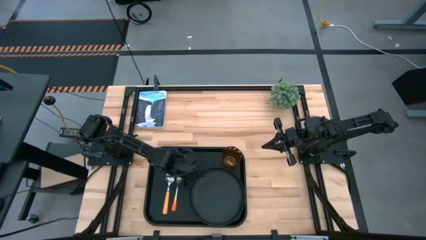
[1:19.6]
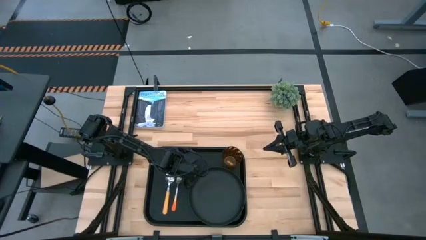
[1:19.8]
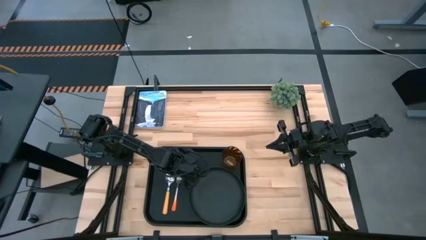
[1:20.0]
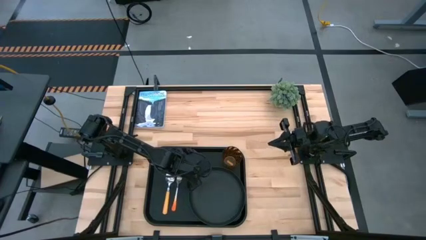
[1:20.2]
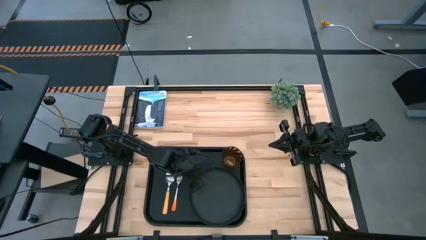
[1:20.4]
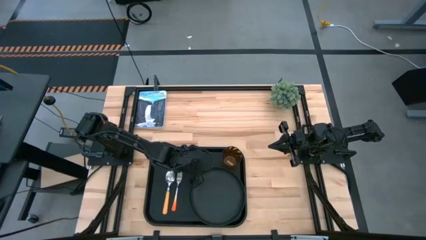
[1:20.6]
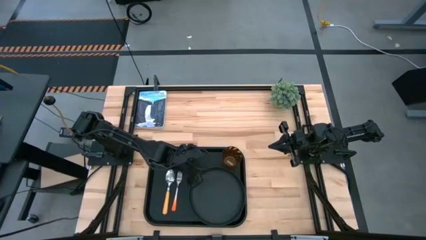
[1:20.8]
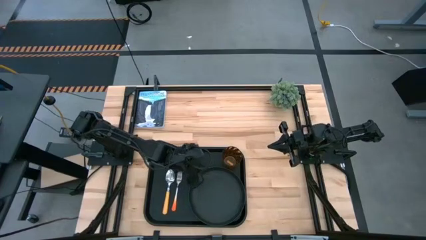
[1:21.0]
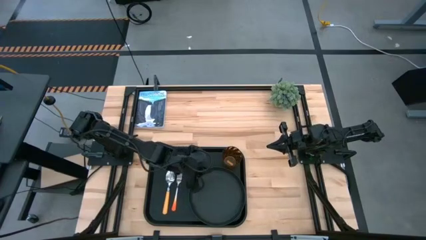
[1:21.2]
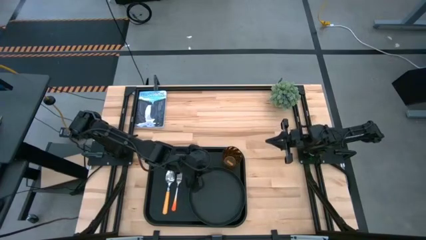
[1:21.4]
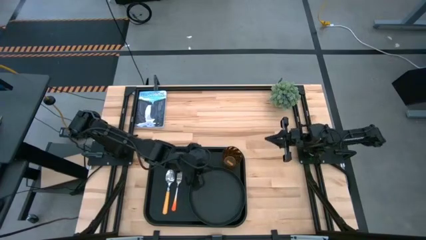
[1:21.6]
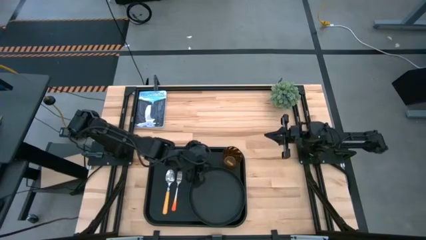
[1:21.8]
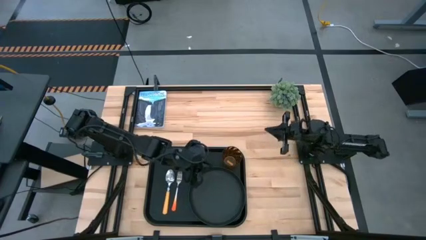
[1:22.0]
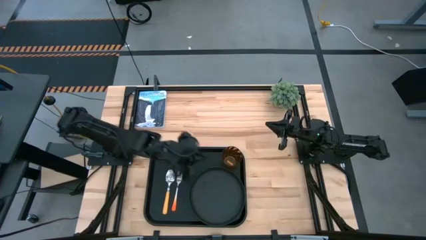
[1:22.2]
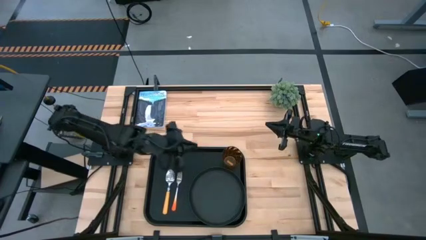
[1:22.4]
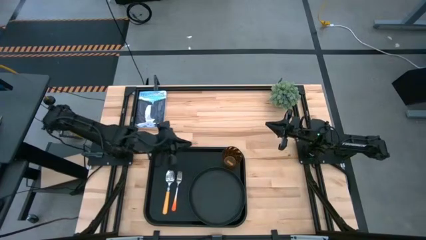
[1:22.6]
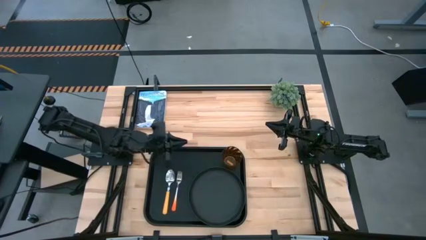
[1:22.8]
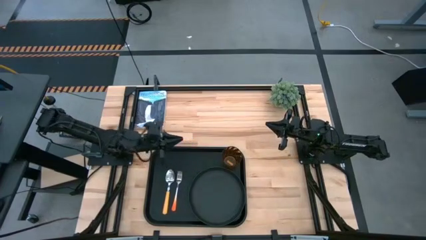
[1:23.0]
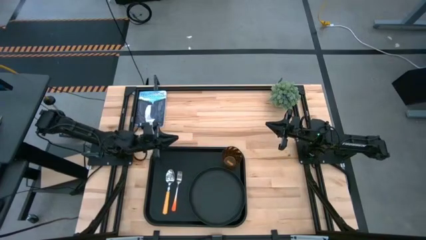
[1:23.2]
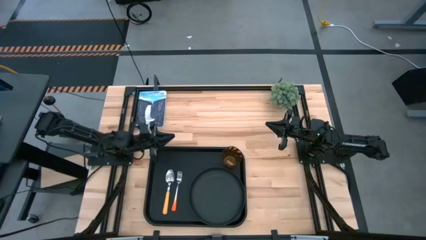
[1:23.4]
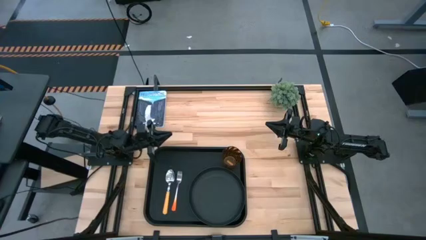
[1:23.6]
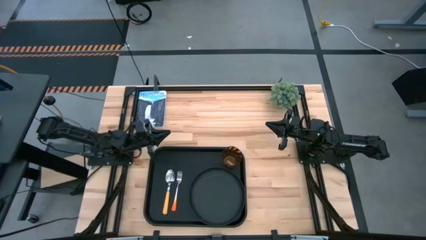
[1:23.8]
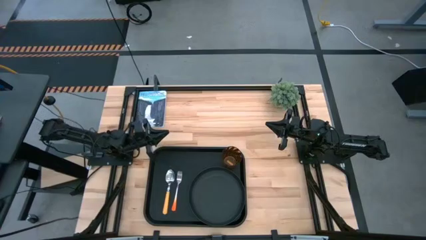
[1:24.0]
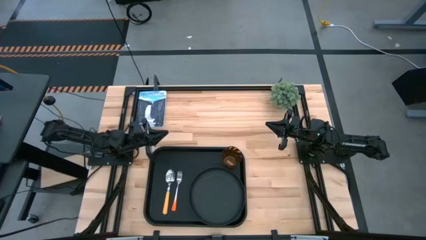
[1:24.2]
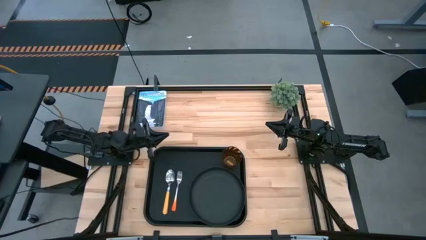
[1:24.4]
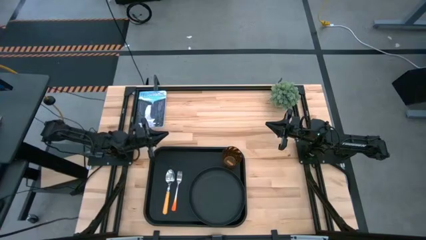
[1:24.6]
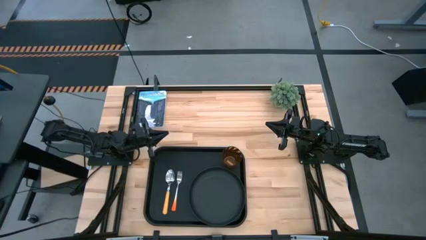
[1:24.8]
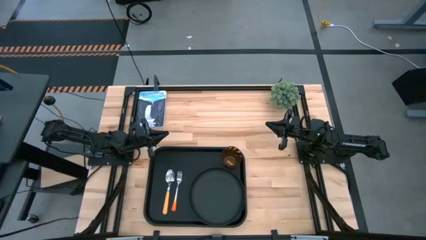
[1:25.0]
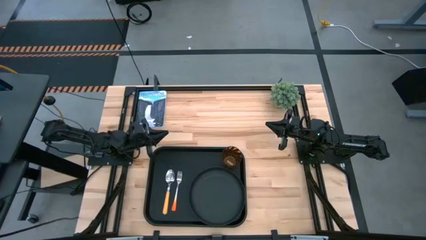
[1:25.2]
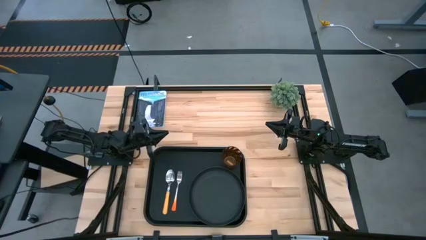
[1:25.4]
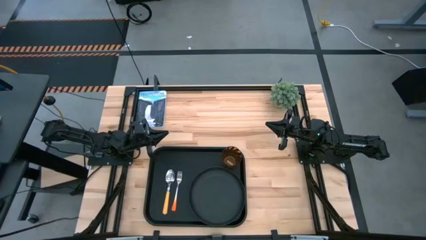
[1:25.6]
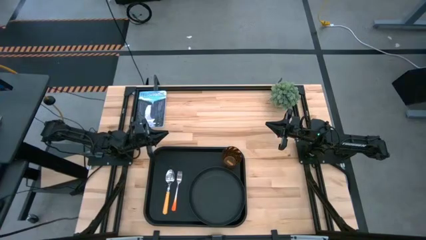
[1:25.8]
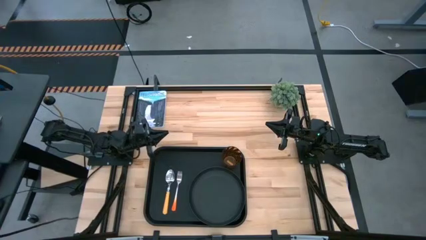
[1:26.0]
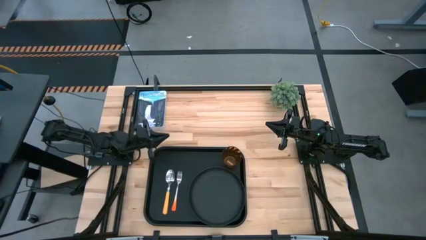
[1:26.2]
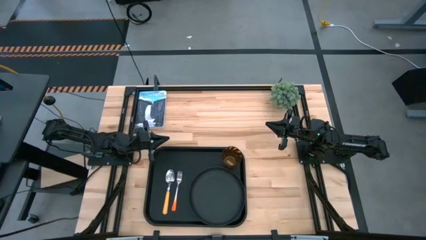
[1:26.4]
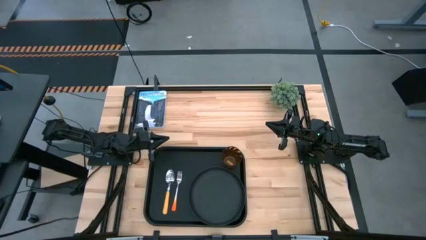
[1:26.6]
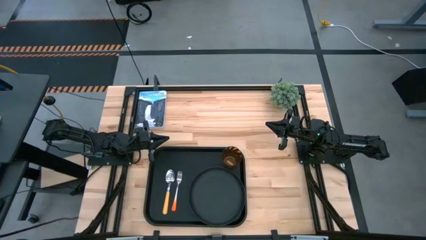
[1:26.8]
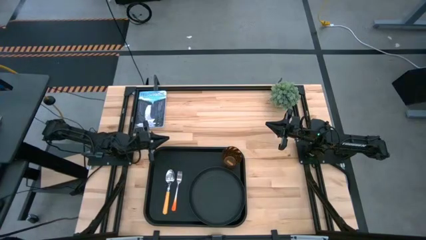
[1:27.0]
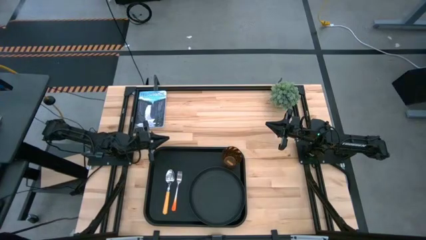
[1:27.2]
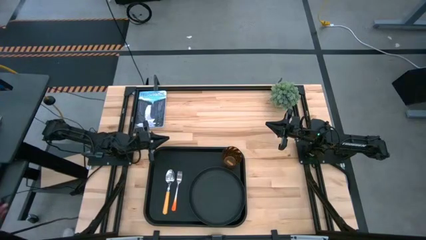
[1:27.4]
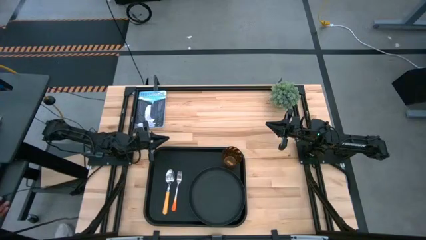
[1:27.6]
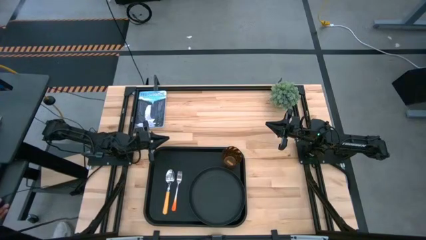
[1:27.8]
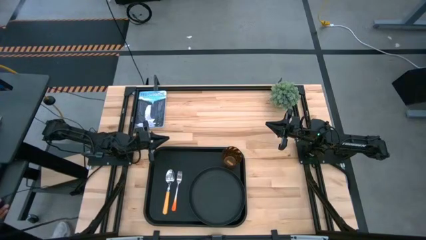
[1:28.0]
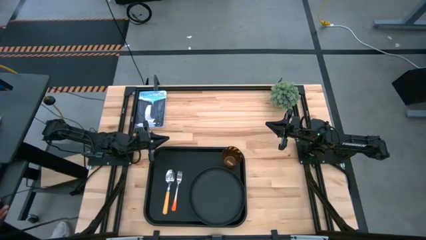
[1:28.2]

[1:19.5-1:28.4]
Task: Pick and place plate/cup/fork/spoon on tray
Return to Home Position

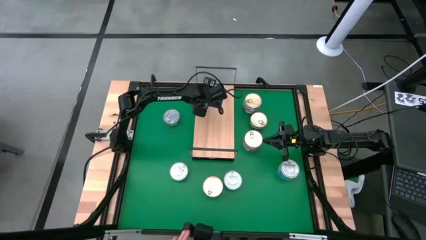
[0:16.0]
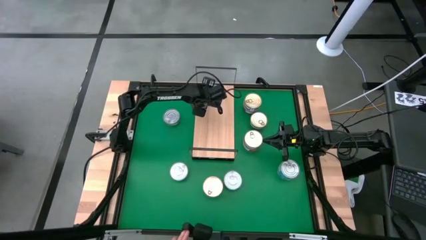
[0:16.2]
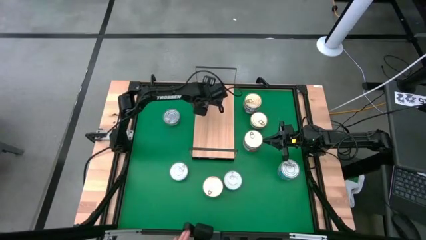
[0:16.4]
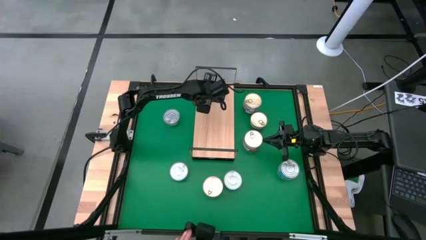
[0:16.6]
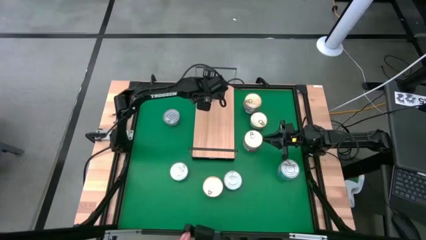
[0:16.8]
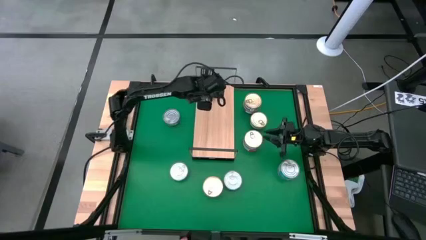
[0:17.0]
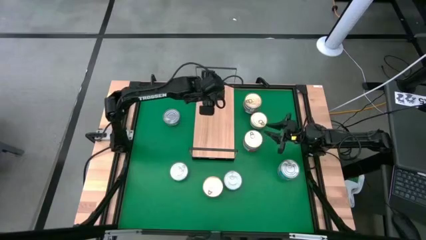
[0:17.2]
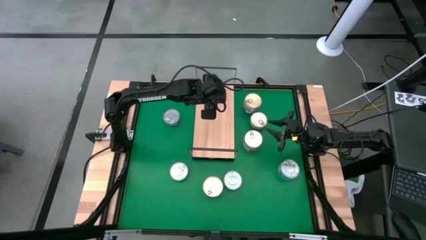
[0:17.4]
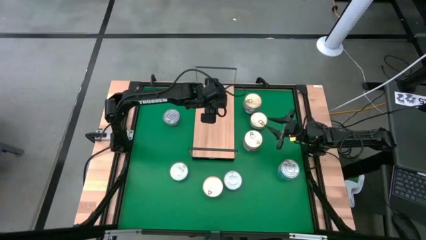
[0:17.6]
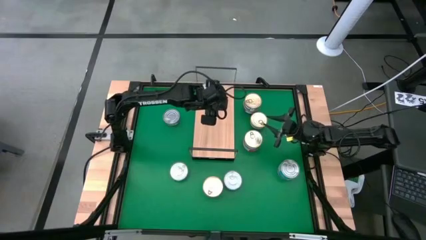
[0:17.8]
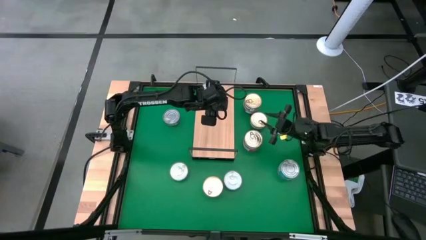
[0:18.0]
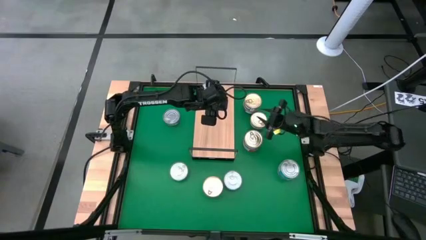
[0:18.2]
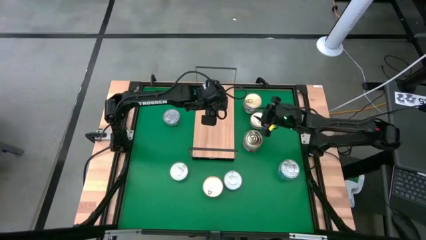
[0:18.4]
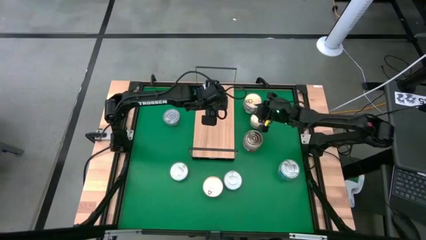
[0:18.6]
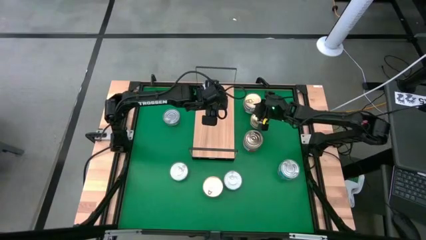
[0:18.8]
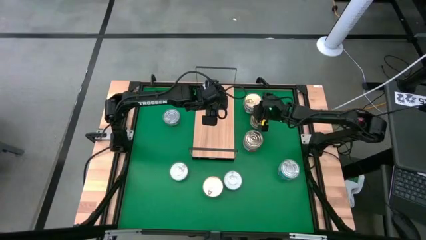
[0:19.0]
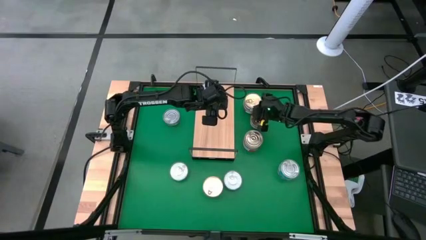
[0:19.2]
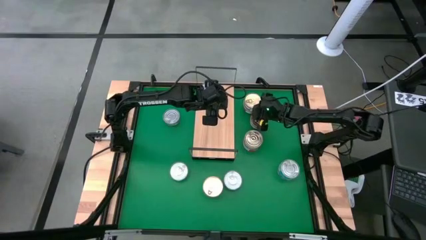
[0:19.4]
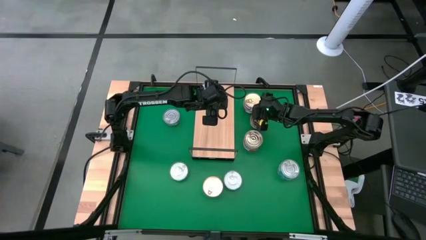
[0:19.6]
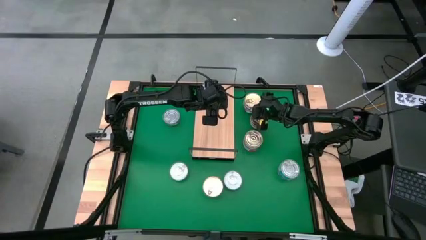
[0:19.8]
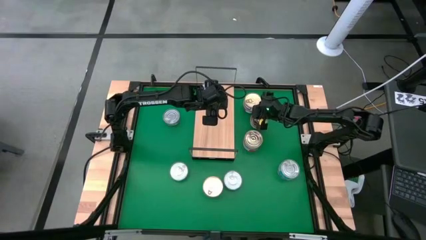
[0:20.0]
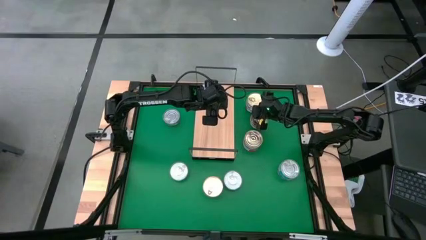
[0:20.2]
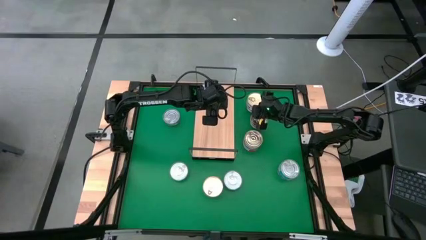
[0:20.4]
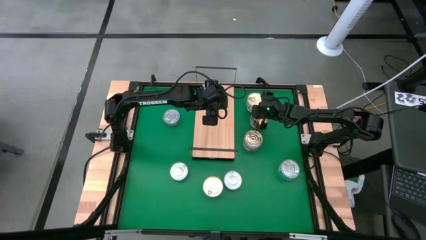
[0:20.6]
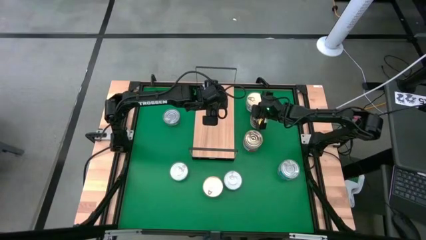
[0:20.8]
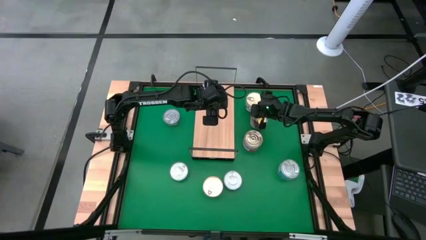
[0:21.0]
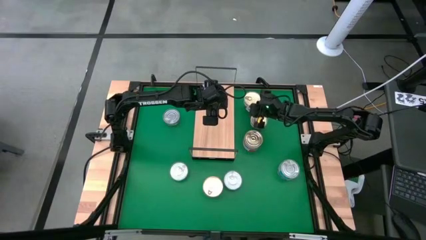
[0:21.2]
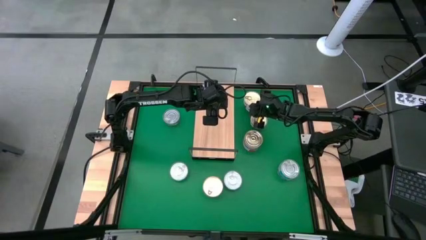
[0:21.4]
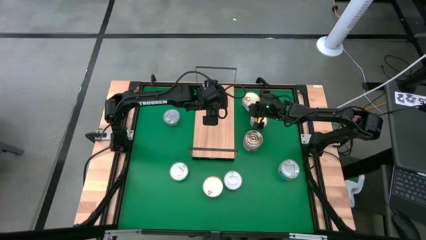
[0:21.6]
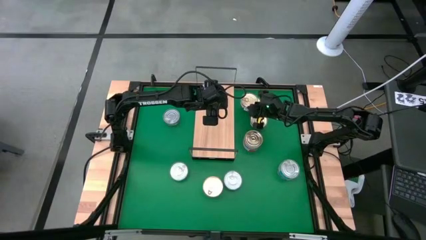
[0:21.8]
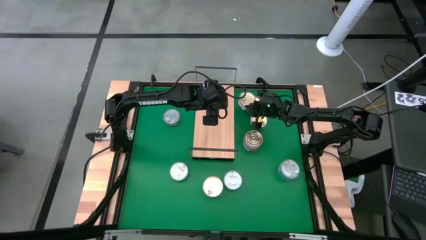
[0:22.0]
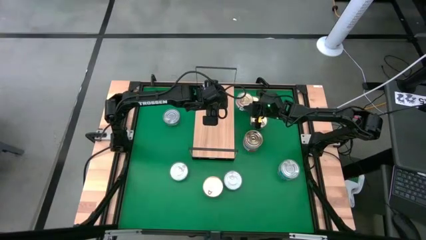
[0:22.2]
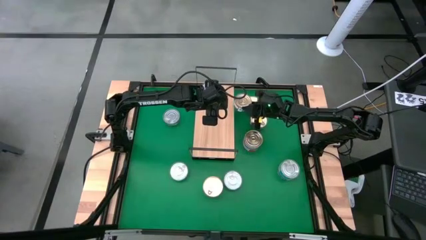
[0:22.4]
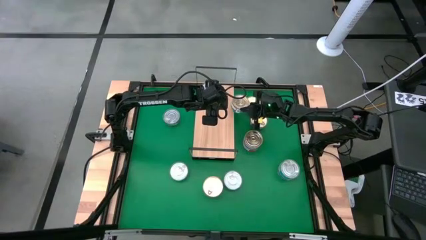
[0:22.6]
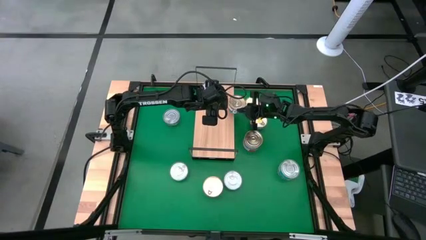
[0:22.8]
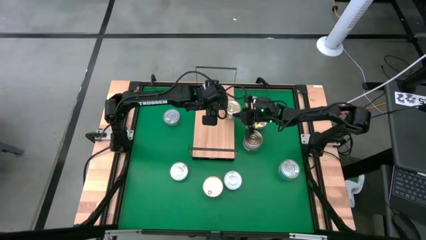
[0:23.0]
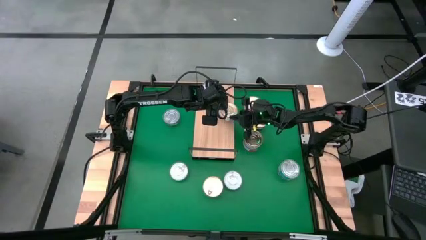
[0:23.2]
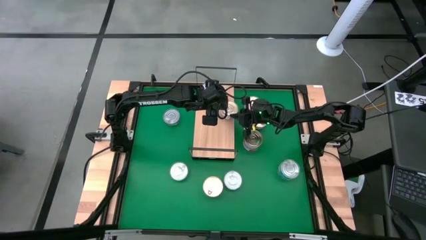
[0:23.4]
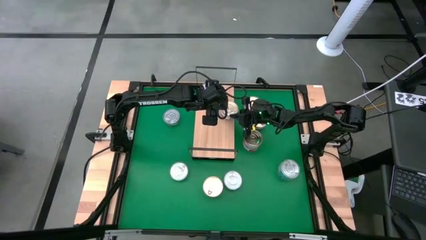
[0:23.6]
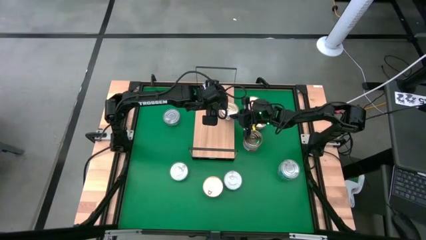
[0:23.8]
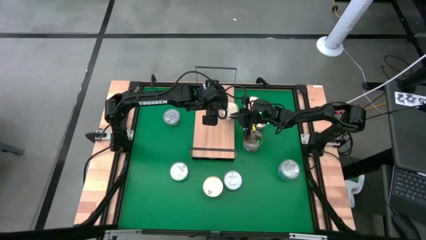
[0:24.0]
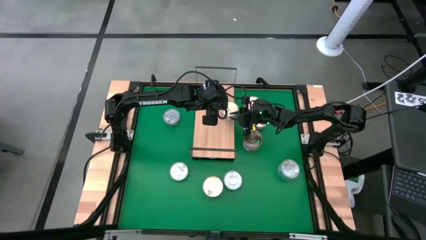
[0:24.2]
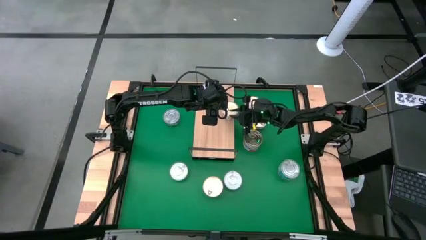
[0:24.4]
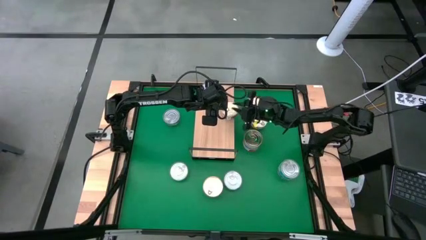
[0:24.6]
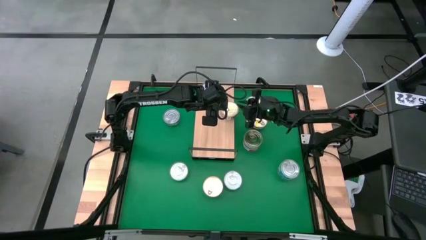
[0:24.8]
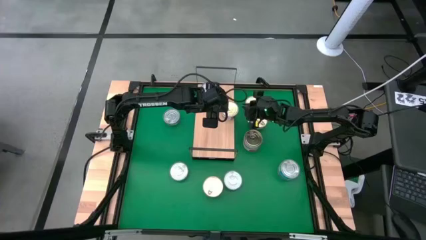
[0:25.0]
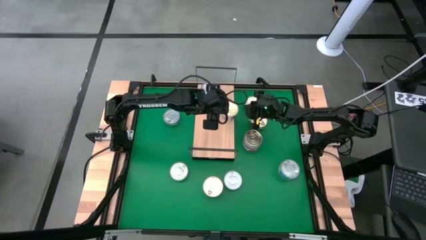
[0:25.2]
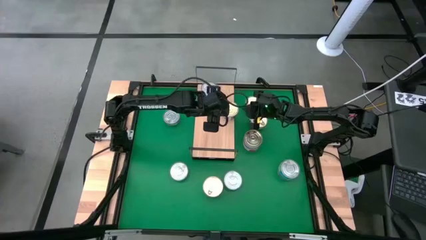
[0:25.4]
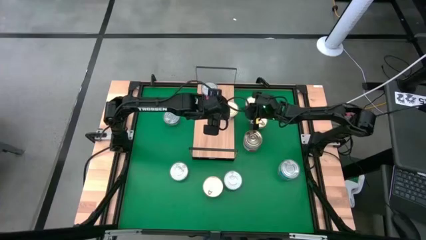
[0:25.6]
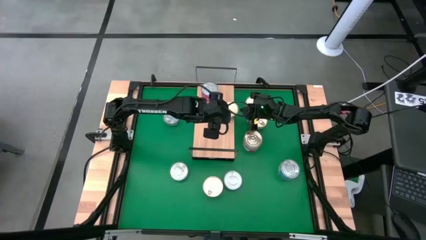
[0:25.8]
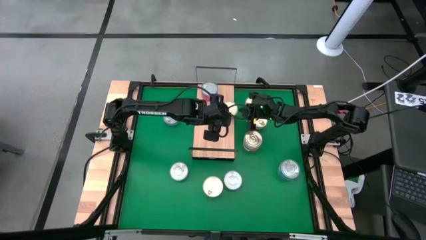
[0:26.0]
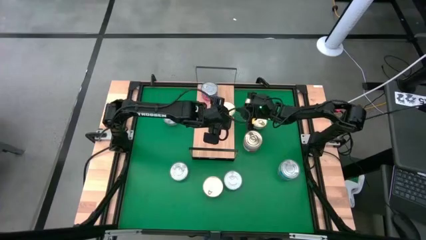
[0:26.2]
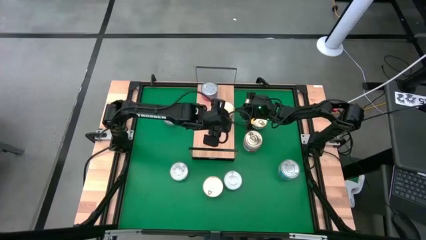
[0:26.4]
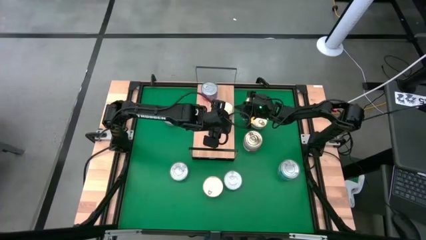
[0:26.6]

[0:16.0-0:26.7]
Task: Stack canned seafood by type on shelf
Put the dark blue tuna can on the shelf
